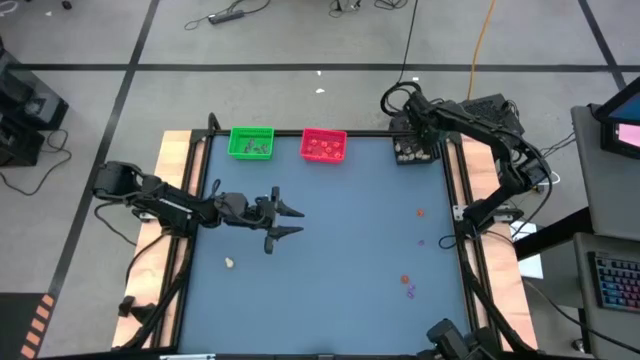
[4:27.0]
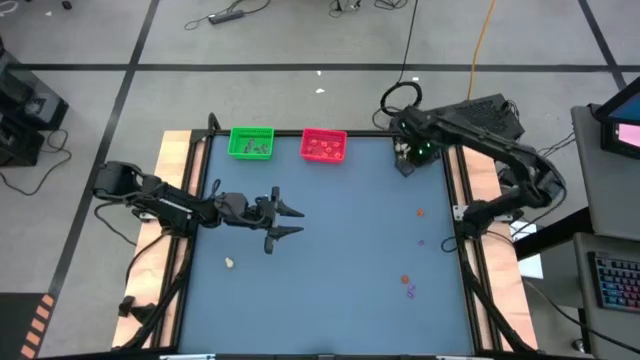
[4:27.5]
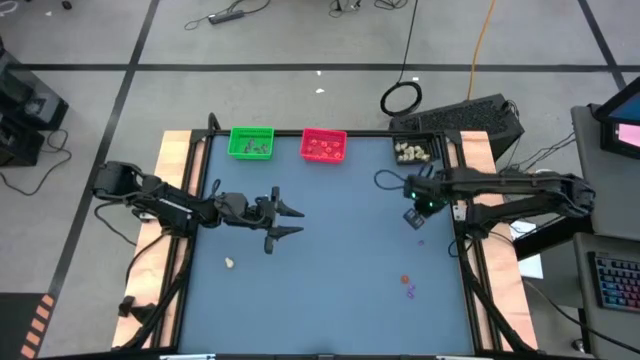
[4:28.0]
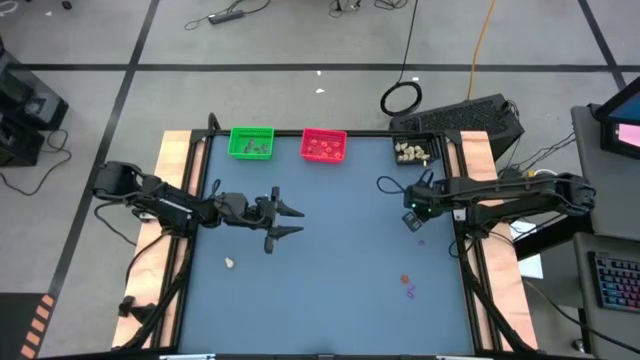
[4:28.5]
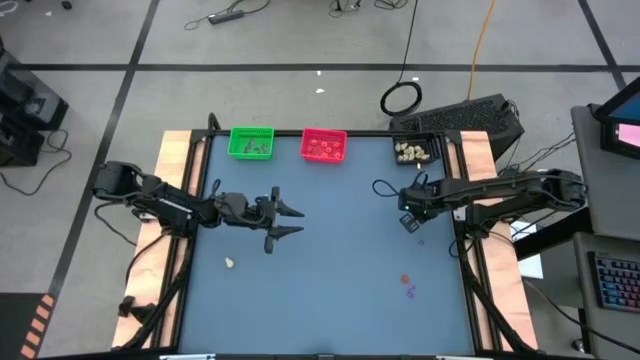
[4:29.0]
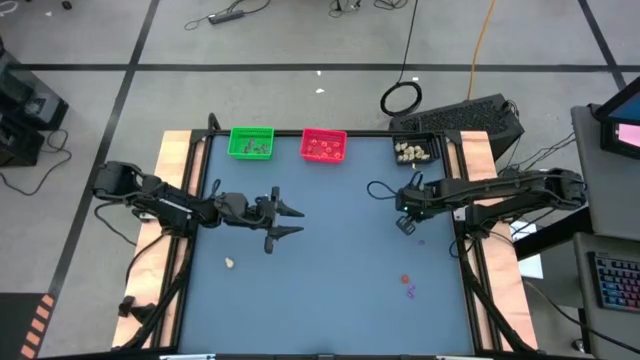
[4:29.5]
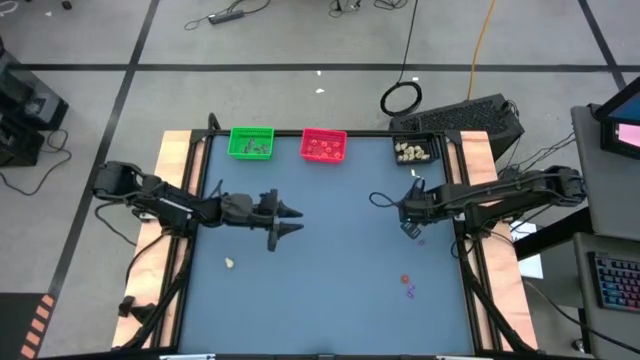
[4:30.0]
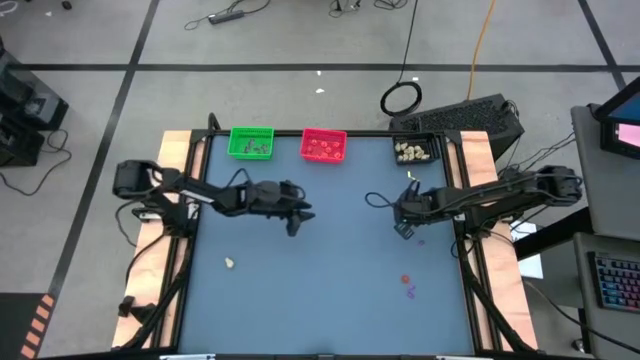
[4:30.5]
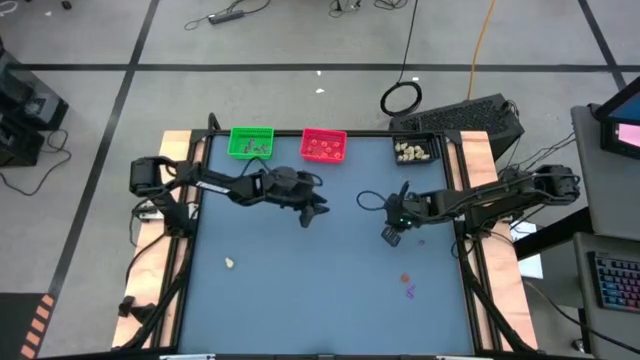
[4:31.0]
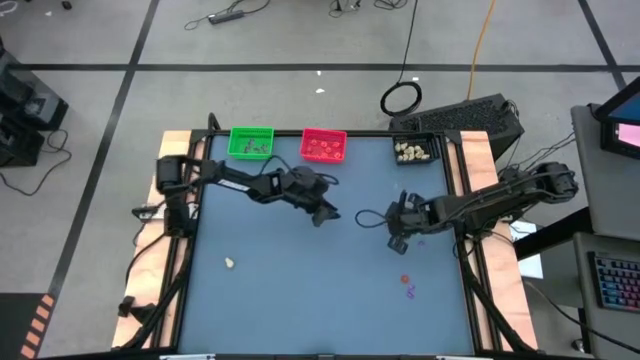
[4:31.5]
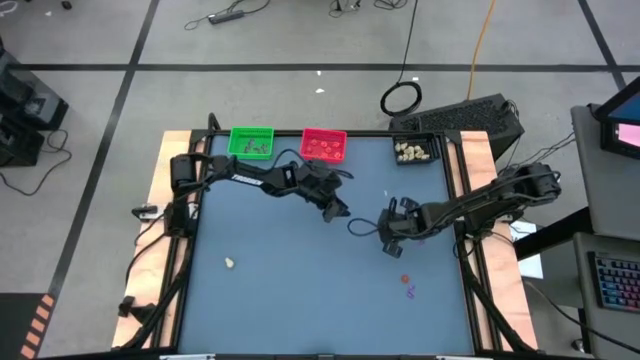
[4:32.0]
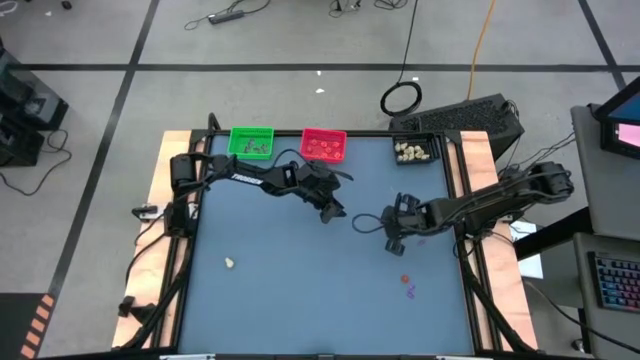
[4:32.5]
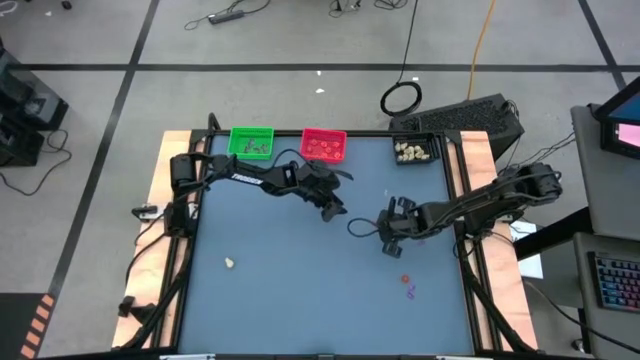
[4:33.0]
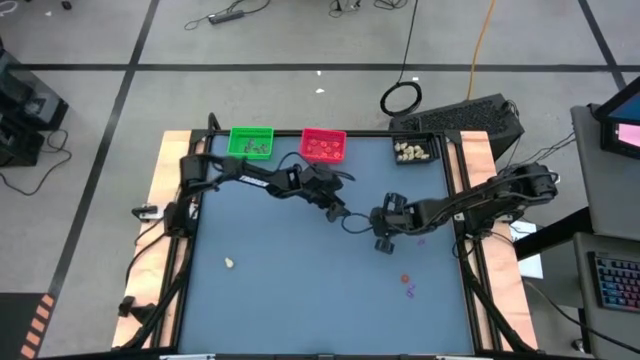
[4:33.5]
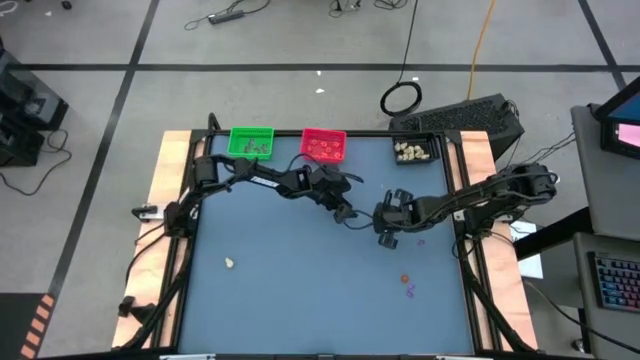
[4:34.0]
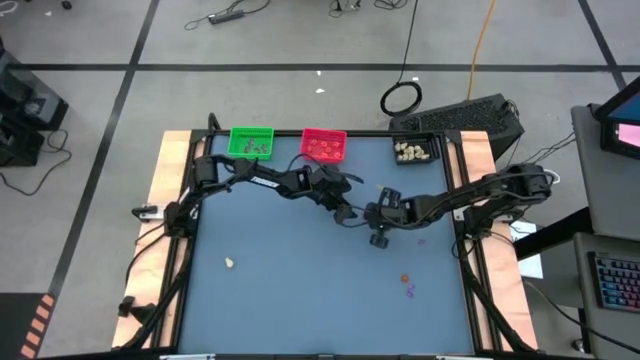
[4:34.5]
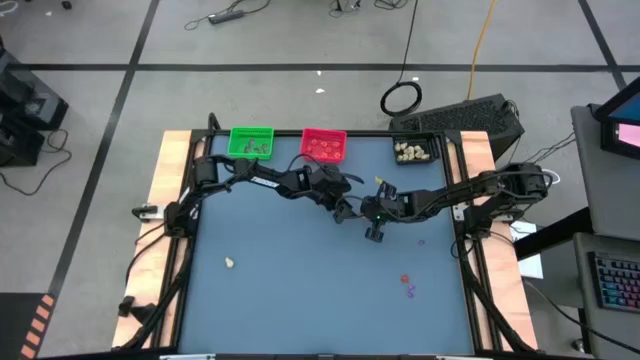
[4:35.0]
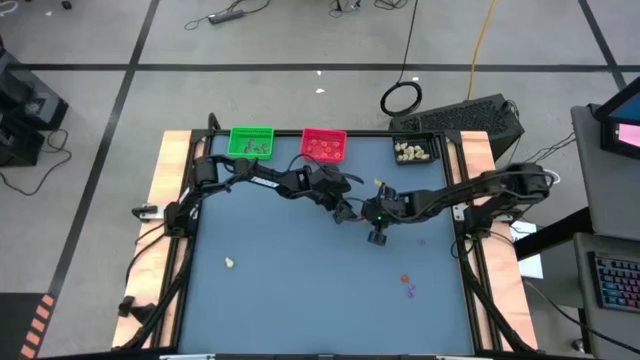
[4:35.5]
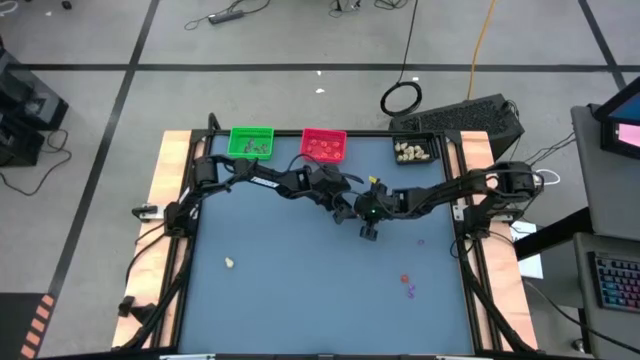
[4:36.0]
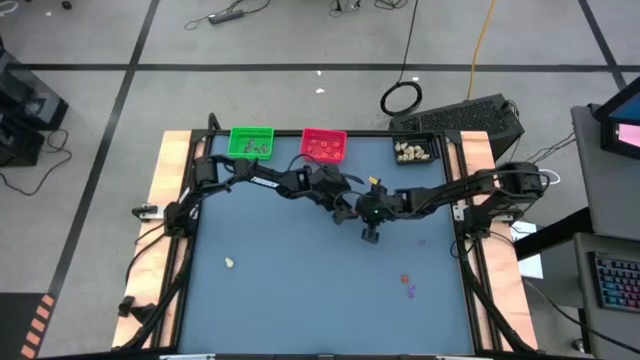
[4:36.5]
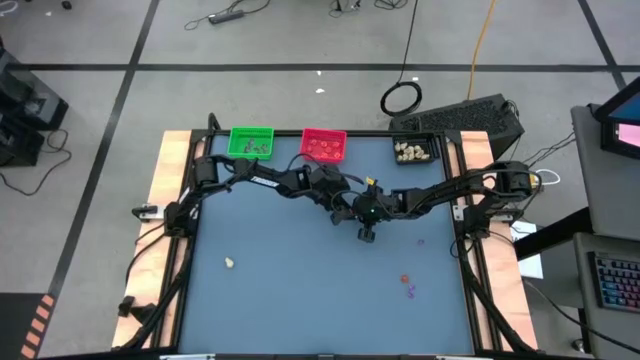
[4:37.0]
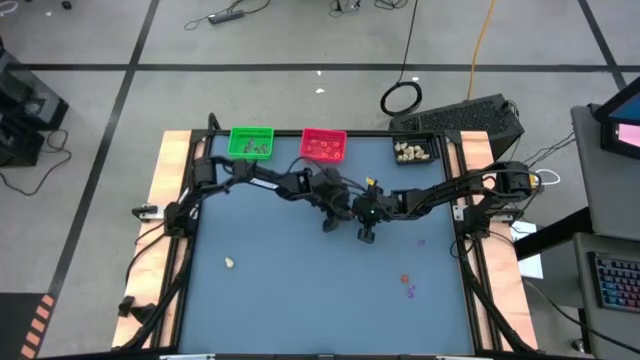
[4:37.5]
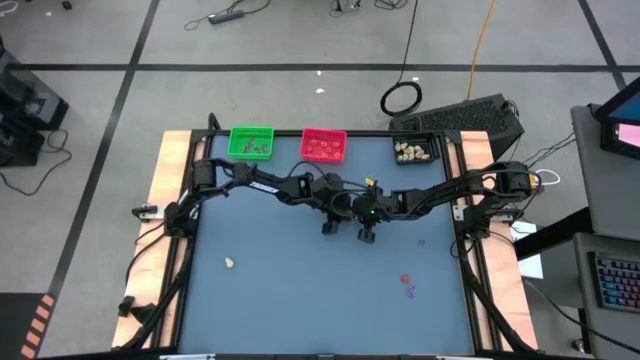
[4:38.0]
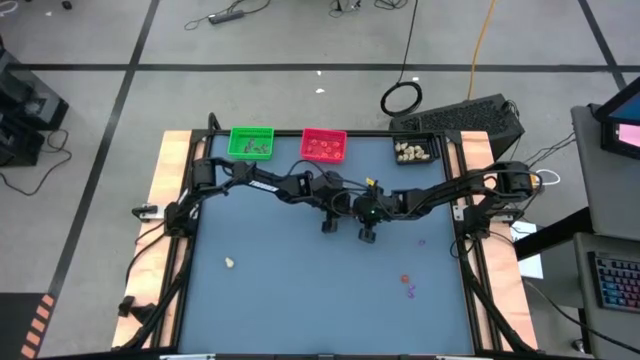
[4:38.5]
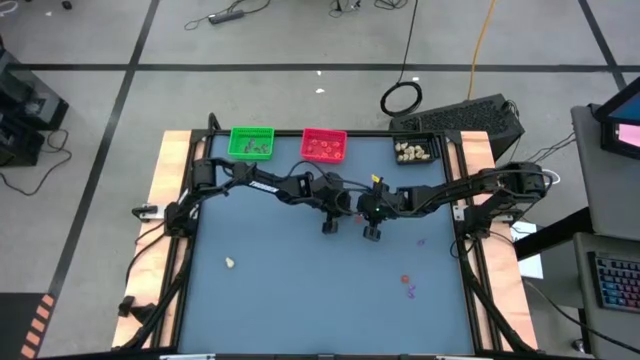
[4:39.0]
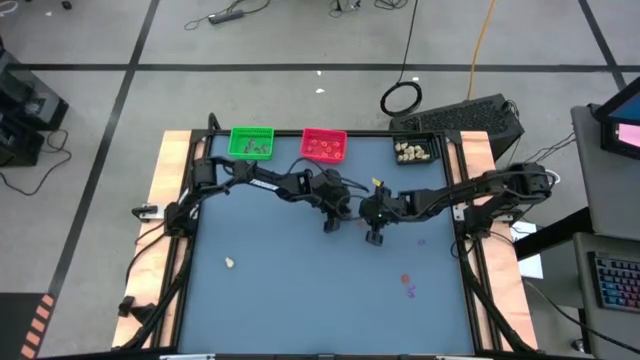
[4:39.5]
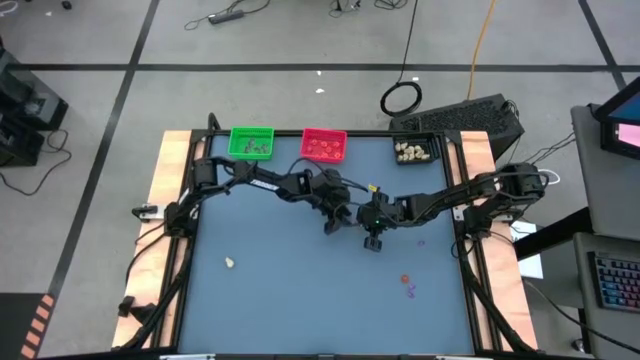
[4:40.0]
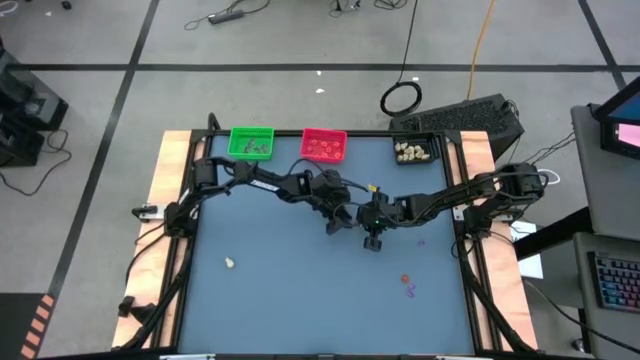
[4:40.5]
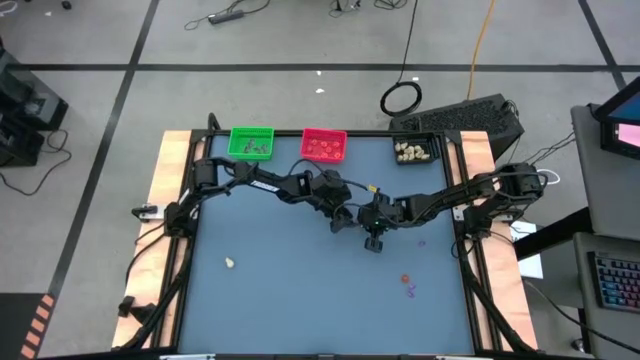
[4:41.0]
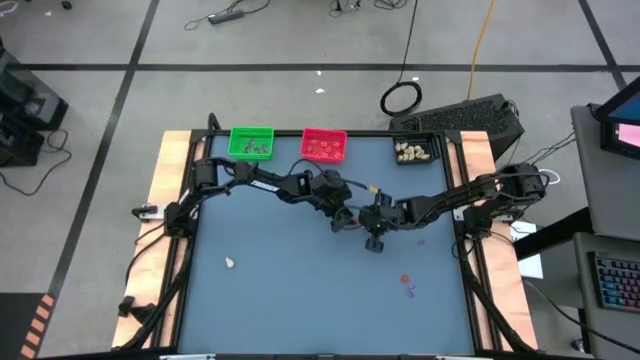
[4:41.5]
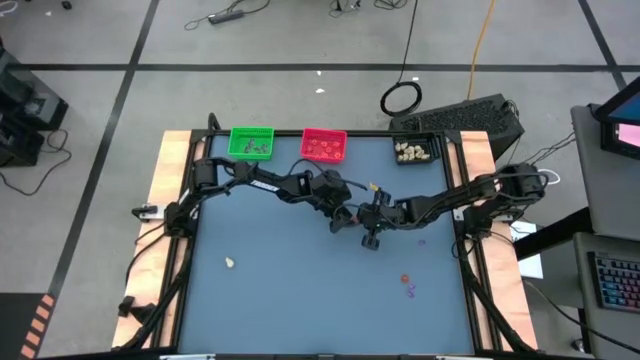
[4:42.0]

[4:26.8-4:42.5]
Task: Sort Halloween decoration
Put the orange pumpkin toy into the red bin

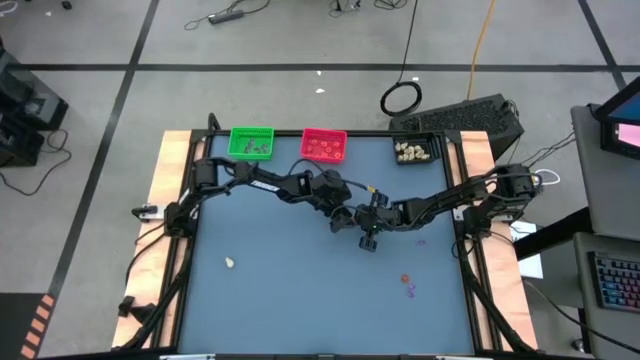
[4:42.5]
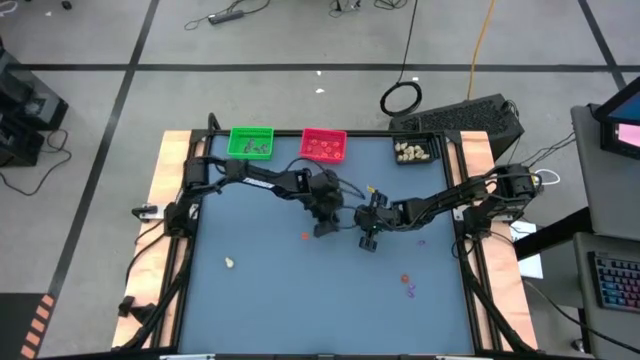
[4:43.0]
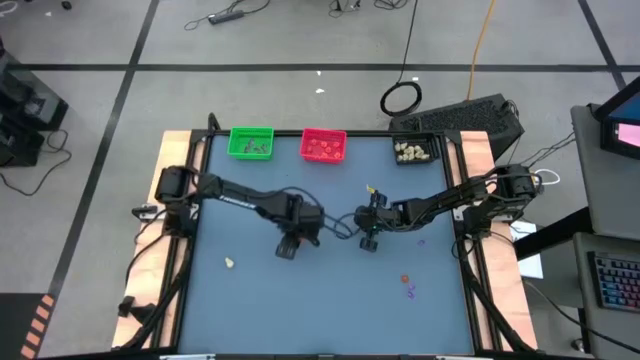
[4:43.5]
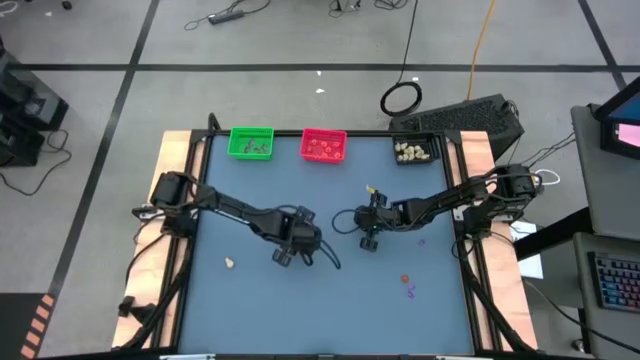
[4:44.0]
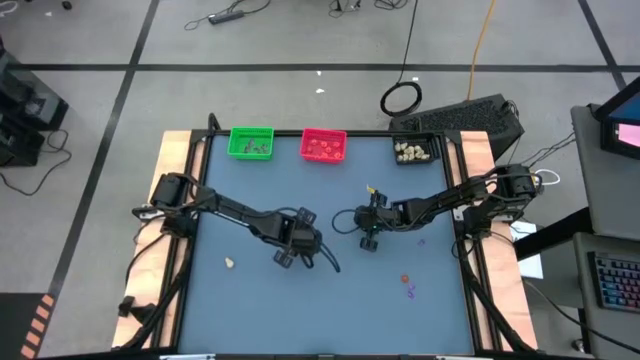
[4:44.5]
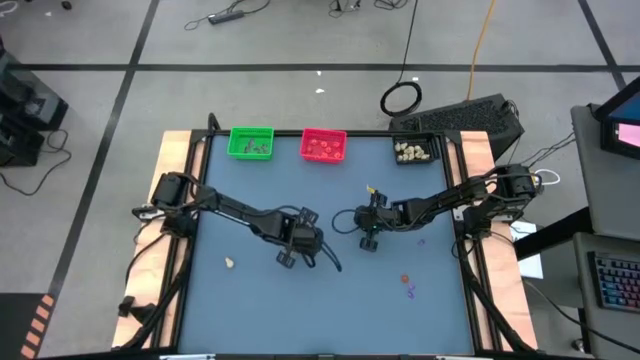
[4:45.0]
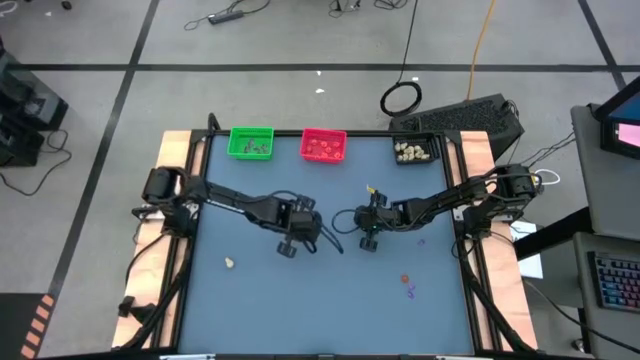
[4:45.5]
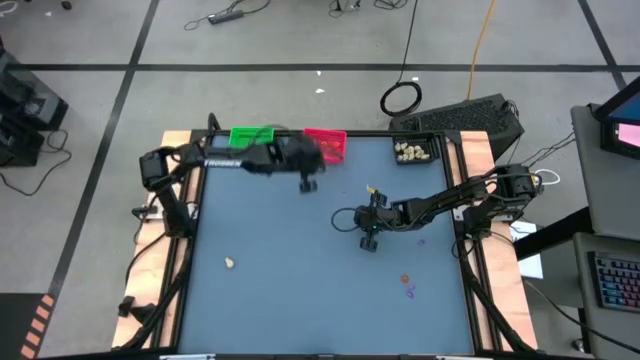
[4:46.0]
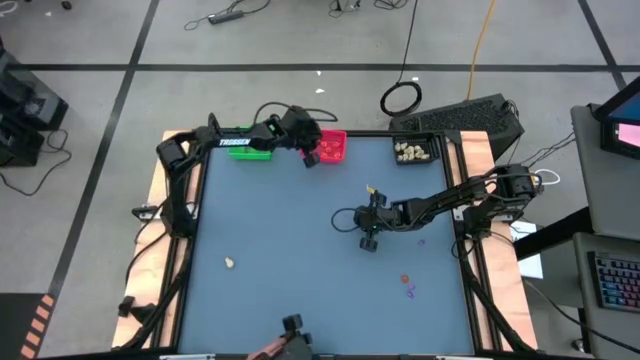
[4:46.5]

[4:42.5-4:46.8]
Put the orange pumpkin toy into the red bin

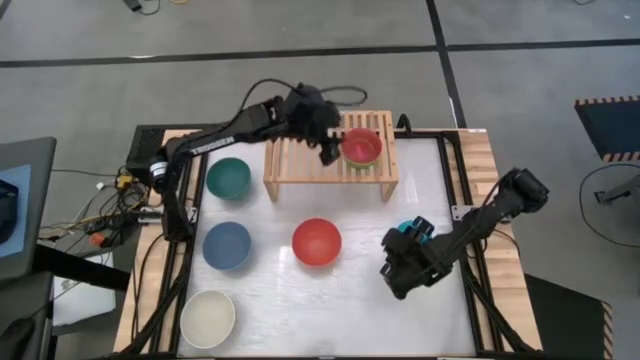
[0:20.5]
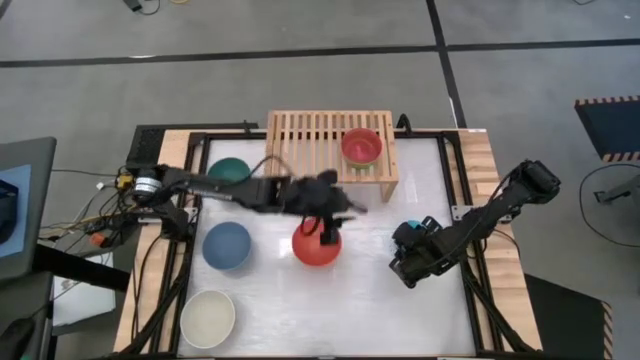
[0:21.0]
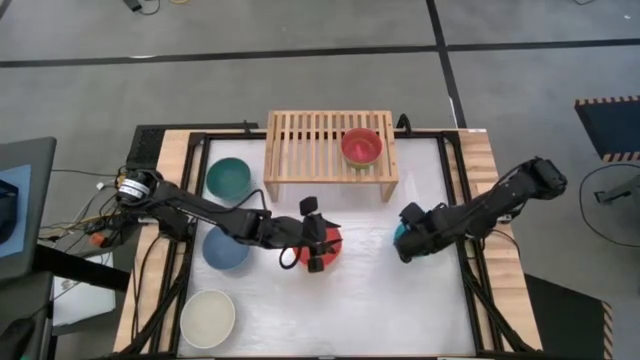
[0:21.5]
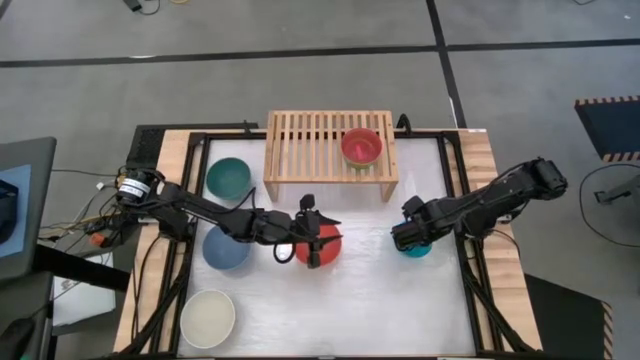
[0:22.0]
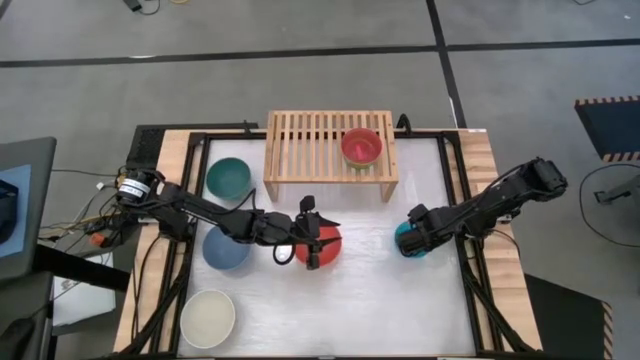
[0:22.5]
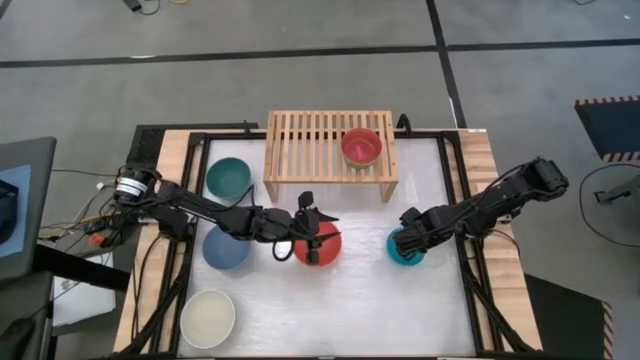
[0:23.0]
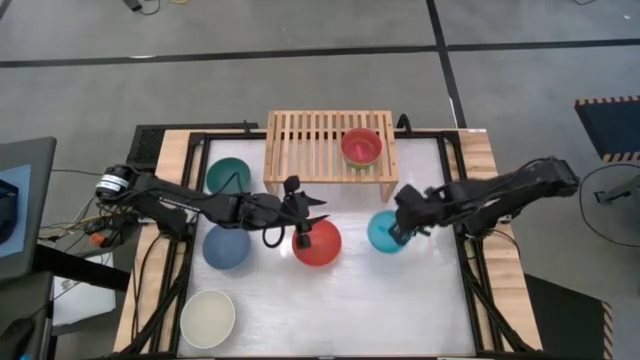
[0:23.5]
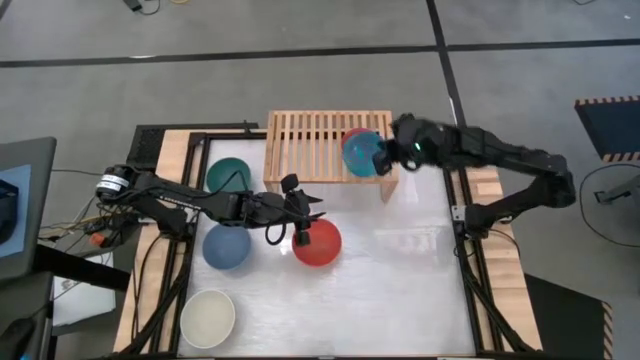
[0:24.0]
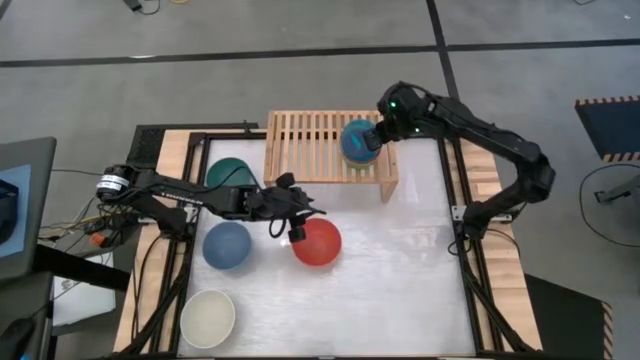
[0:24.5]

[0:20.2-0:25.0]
Task: Place and stack bowls onto a shelf
Stack the light blue bowl on top of the pink bowl on the shelf
